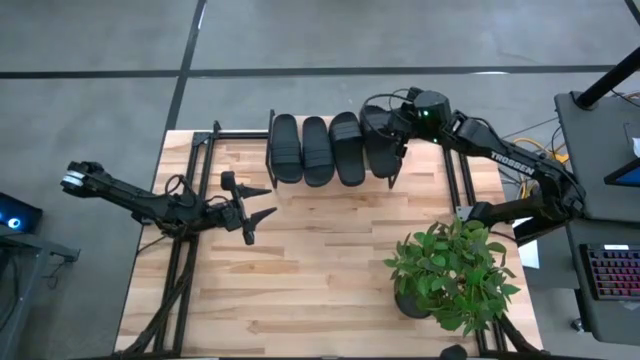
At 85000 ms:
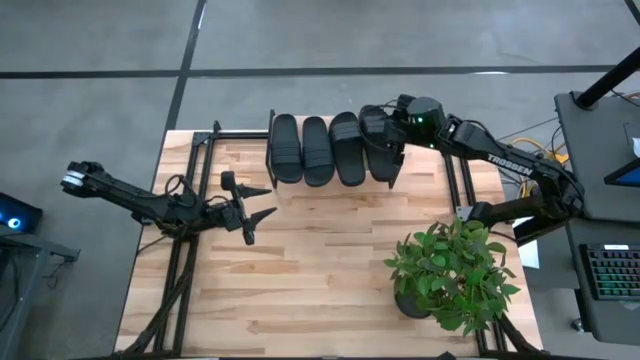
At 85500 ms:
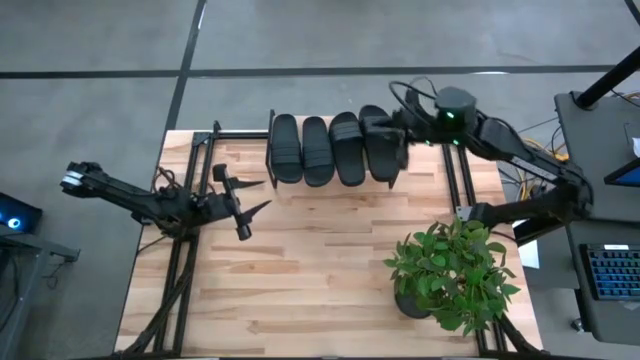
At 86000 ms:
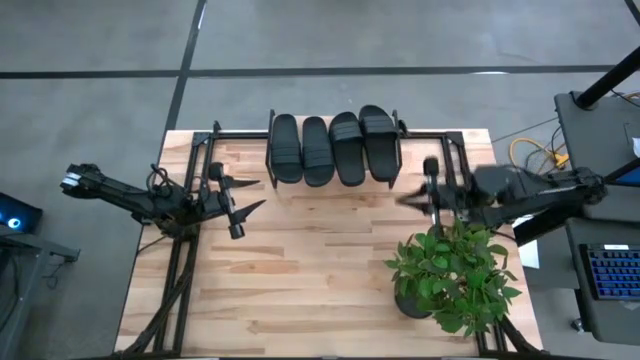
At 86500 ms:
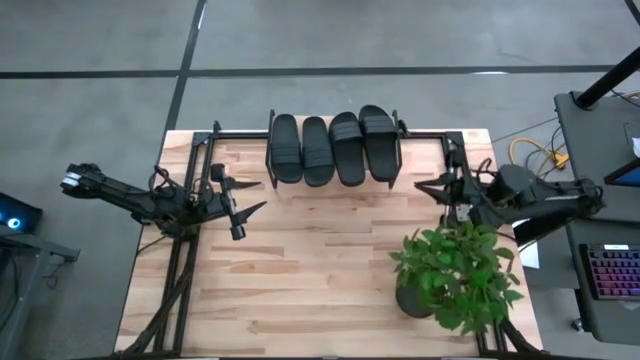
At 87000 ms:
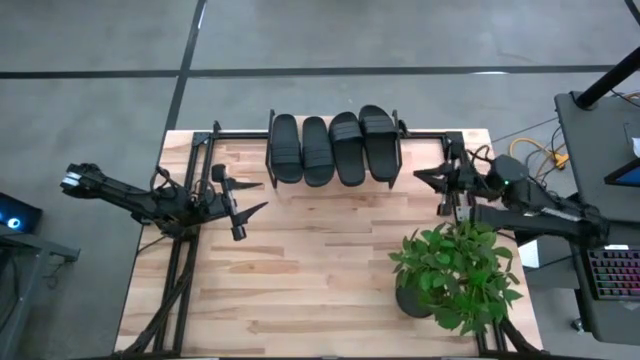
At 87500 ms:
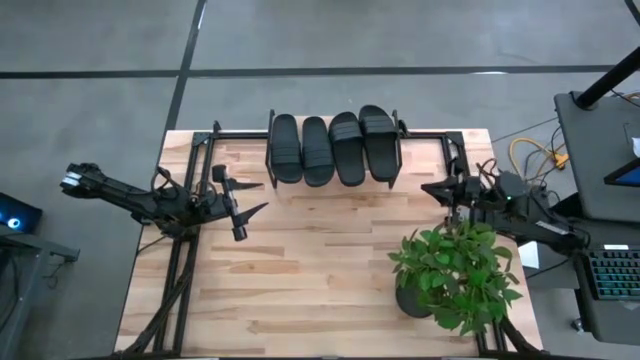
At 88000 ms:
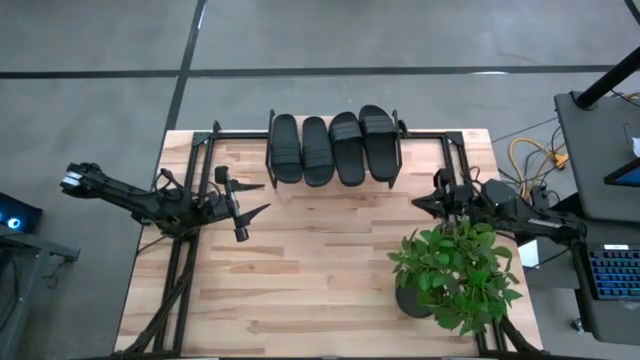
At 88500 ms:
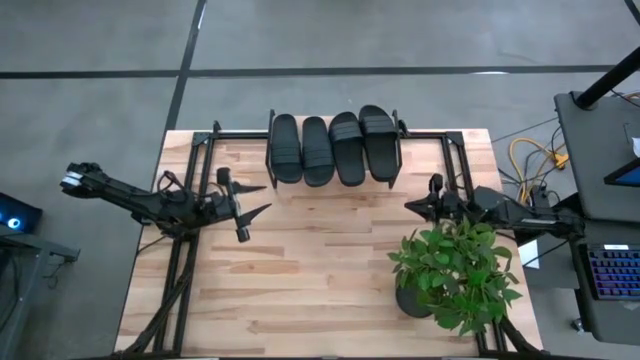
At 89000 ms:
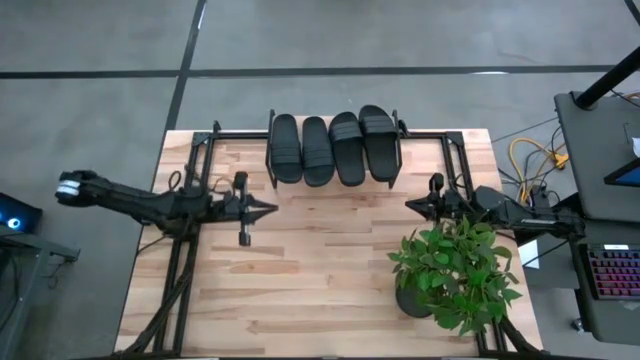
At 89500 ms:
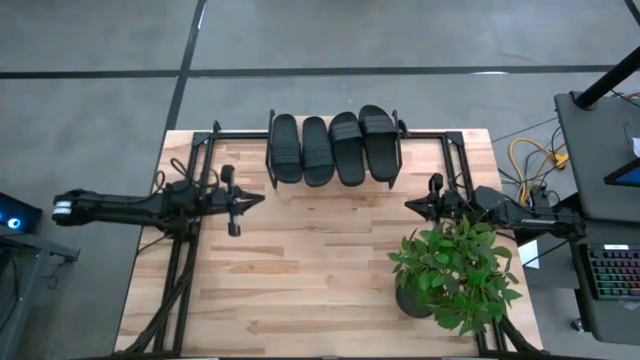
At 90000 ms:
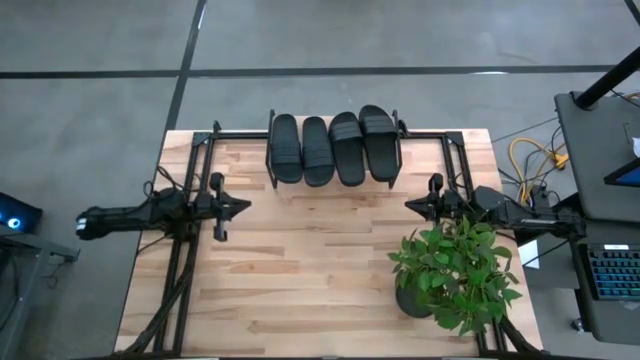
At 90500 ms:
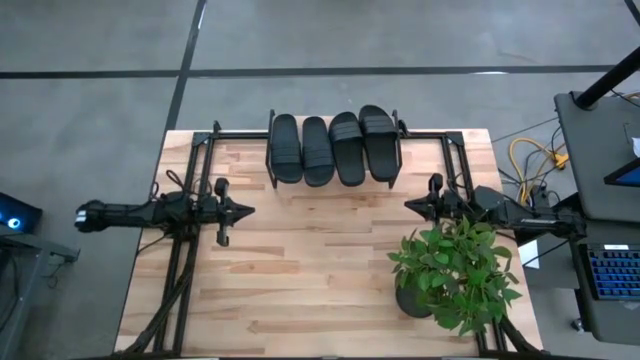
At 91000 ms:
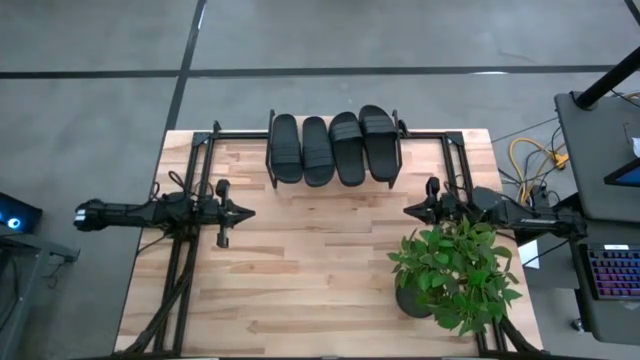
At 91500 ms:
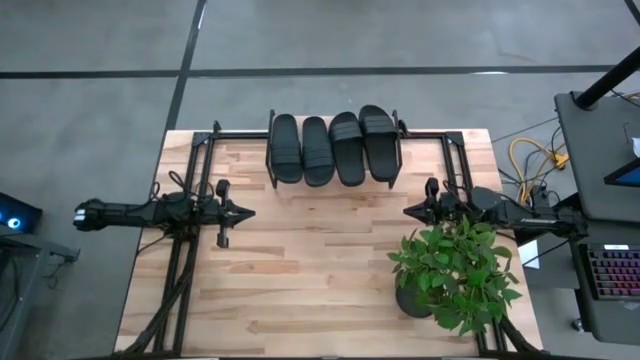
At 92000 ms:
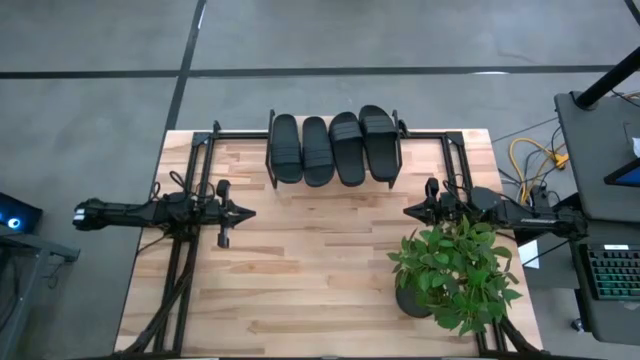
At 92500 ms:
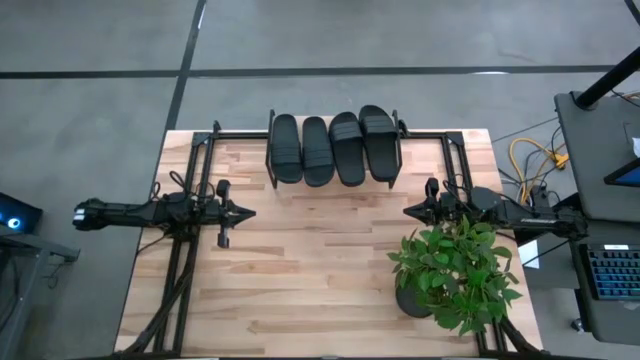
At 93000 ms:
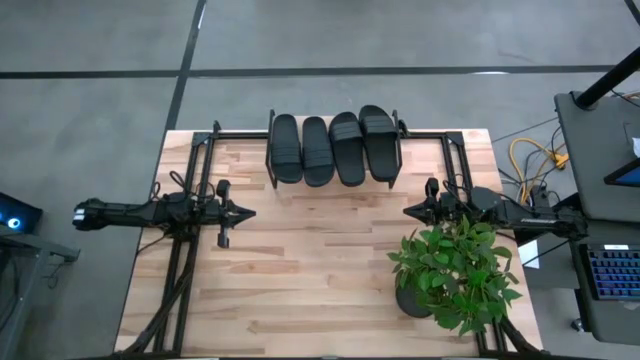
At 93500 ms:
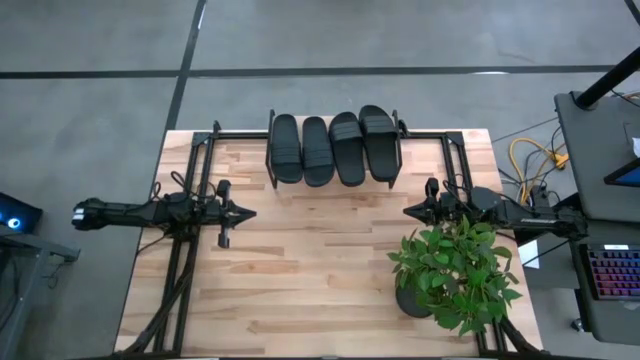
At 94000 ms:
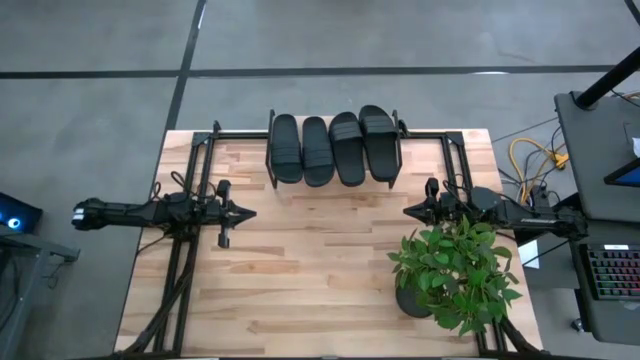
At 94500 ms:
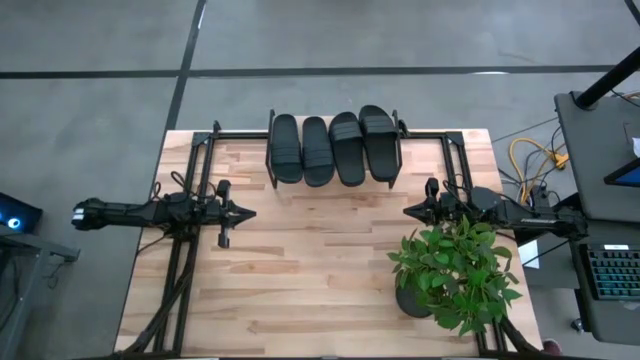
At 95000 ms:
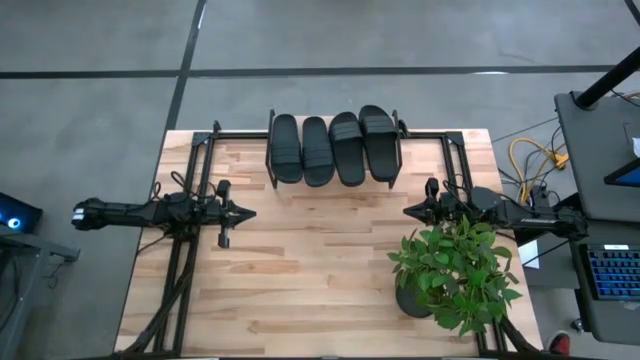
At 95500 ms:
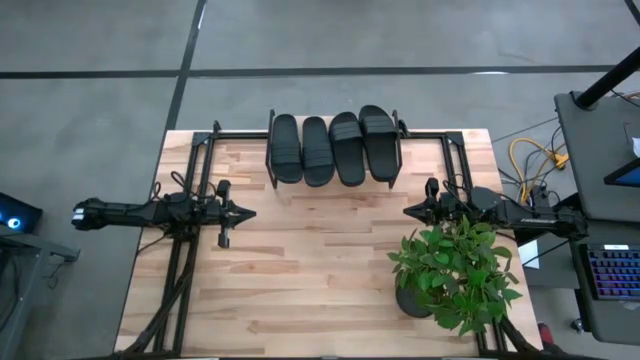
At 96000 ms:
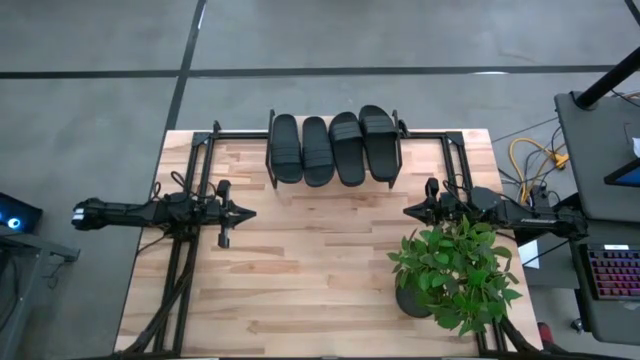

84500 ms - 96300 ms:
Task: Pick and place slides into the shelf
Return to Home Position

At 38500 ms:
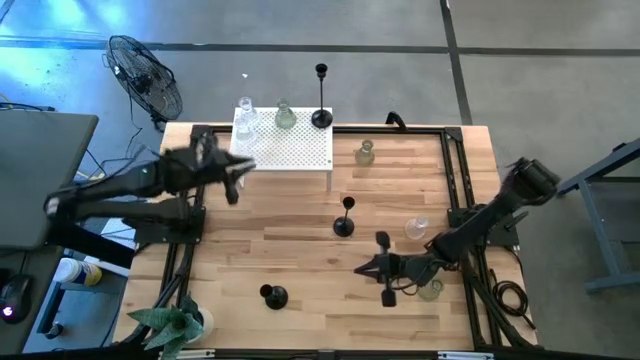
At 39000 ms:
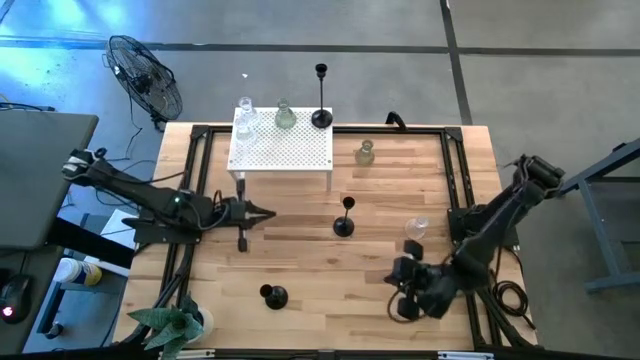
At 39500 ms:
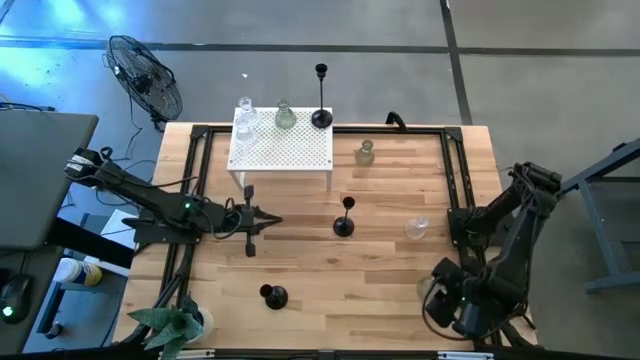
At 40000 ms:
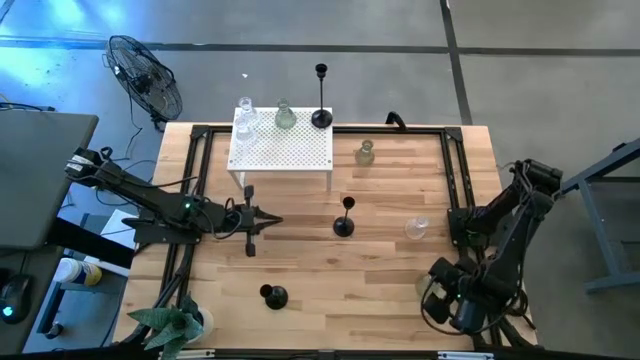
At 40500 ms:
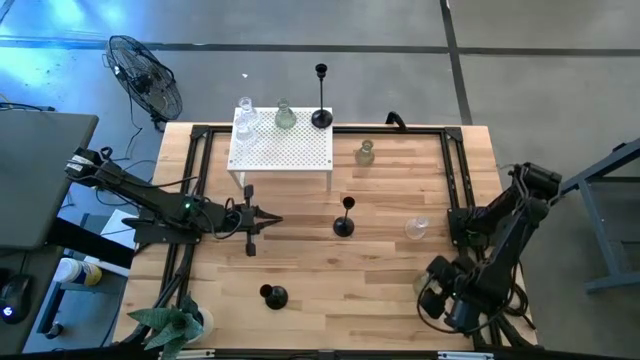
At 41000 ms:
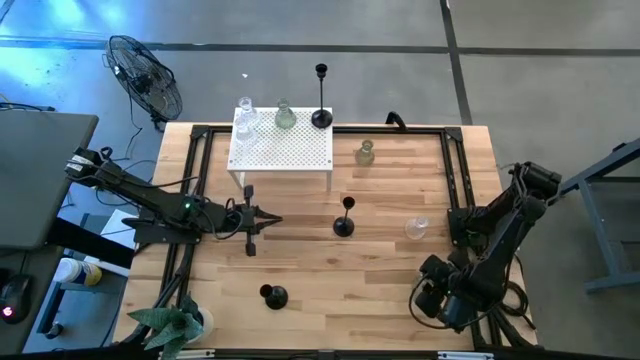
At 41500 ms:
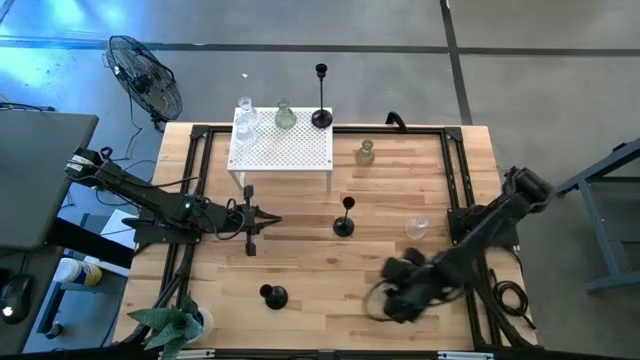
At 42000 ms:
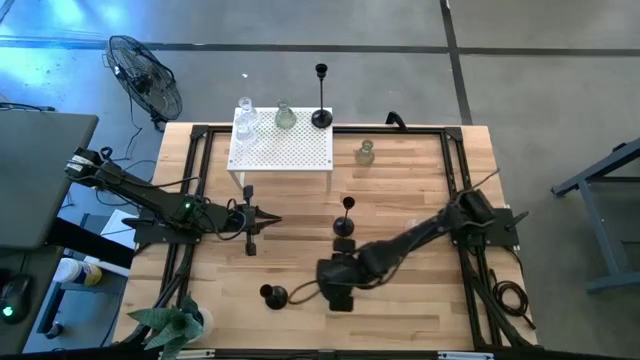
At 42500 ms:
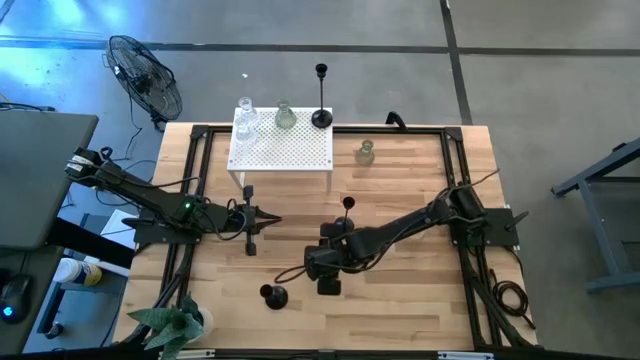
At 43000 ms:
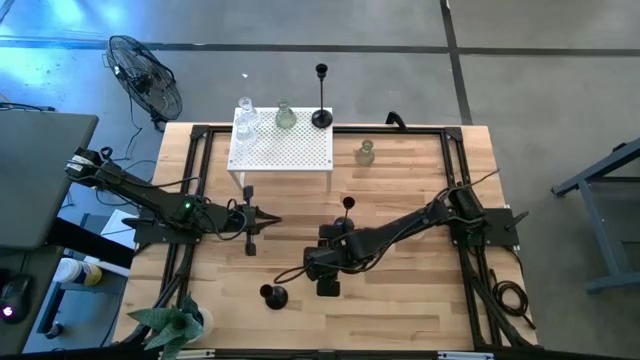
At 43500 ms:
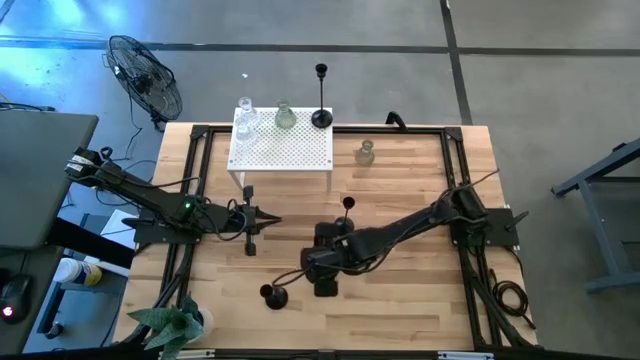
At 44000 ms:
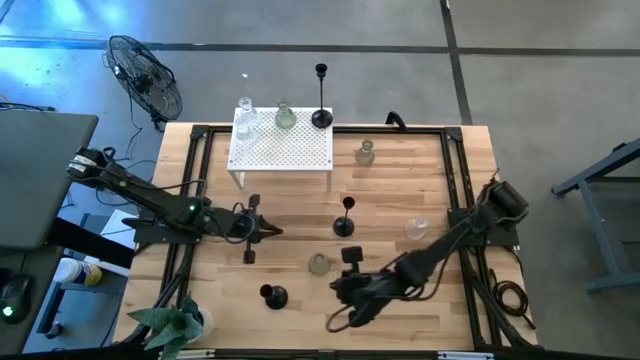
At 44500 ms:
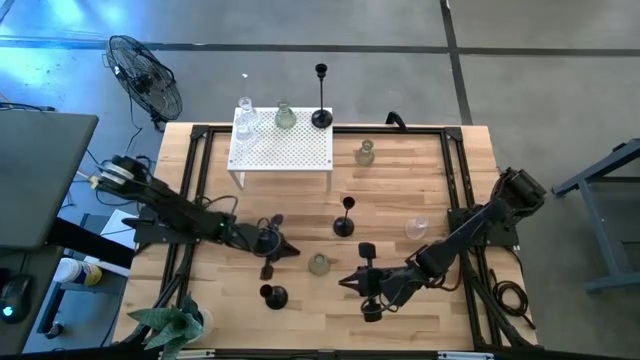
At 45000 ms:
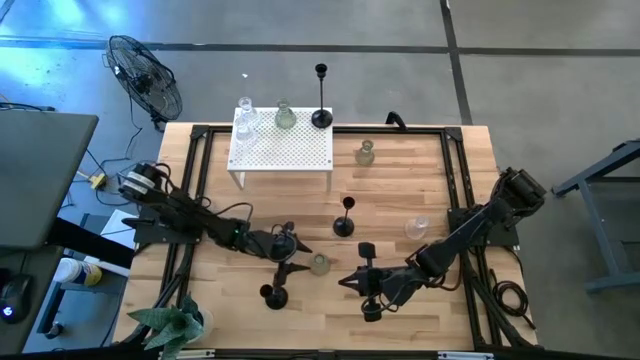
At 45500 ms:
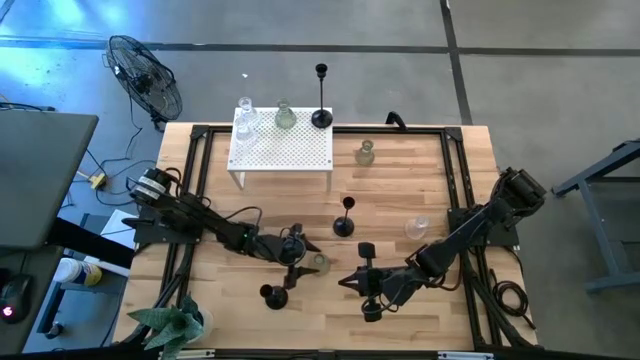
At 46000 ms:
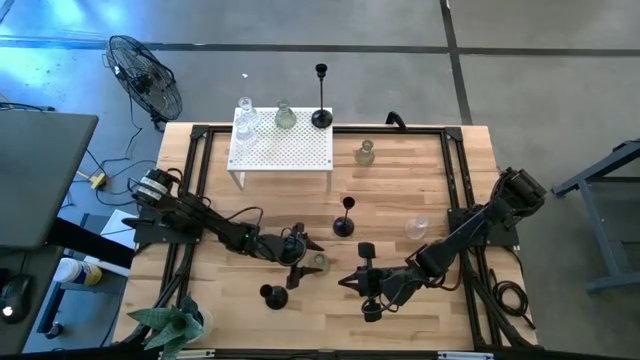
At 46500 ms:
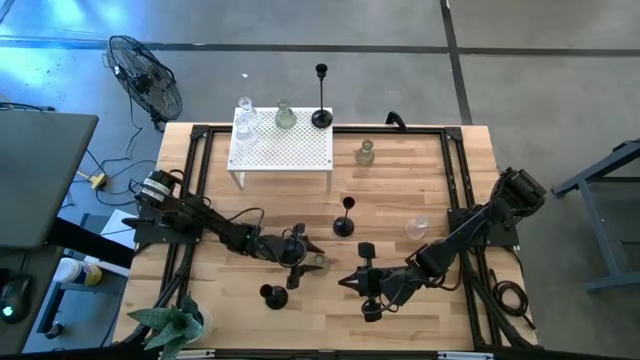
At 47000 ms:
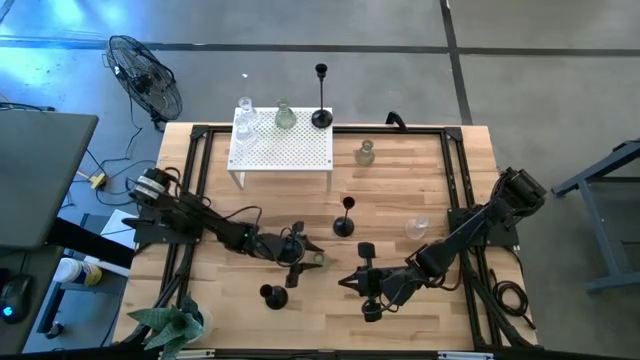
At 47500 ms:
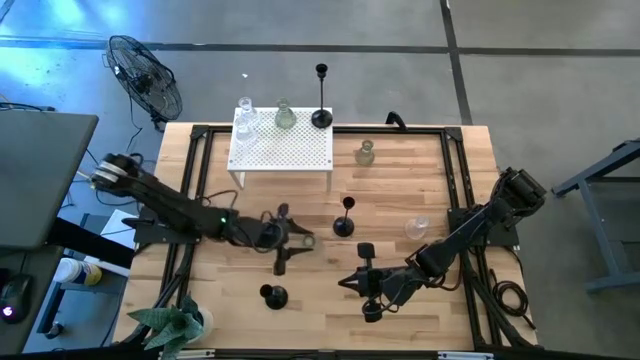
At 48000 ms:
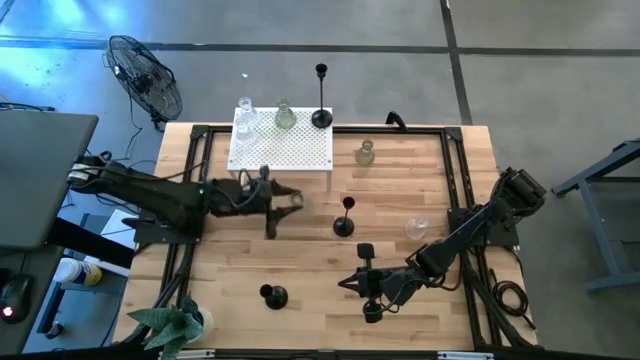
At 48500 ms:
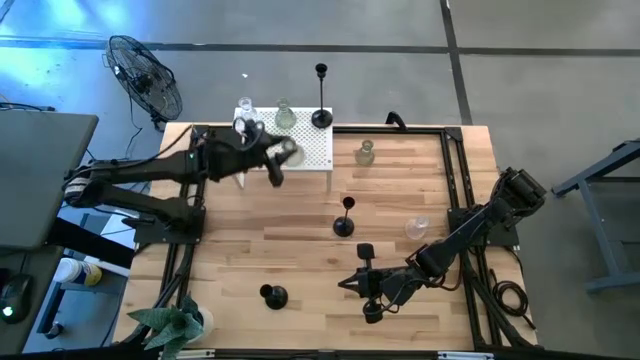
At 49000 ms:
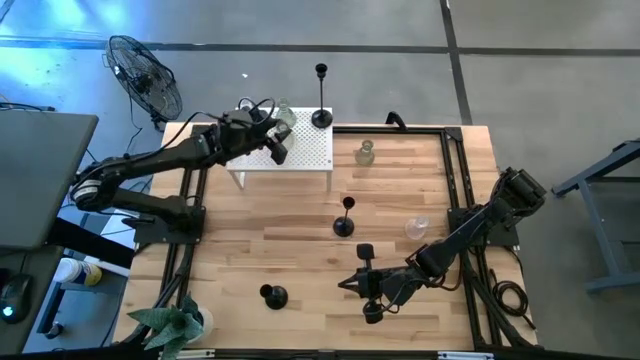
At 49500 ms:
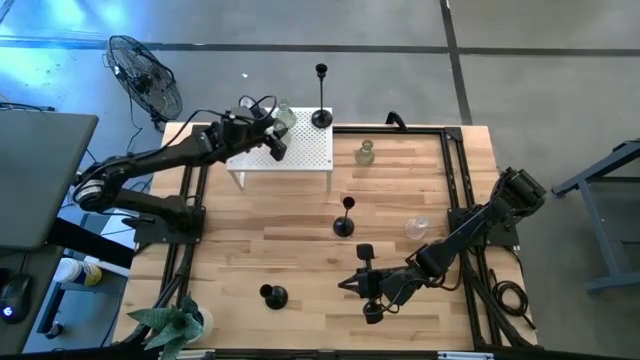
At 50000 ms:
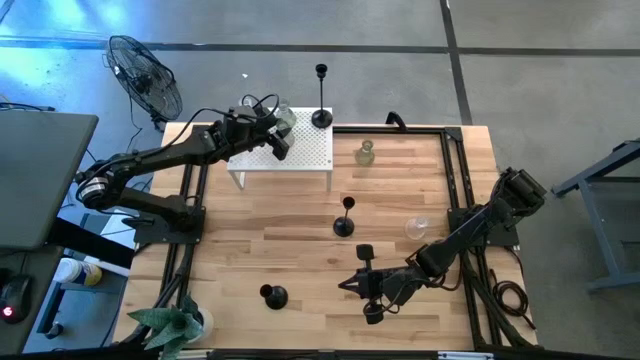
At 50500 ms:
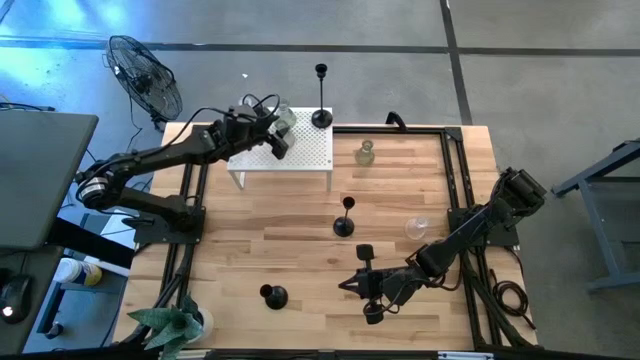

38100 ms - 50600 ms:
Task: Pick & Place candle stick holders
Align the bottom green candle holder with the other green candle holder on the shelf
